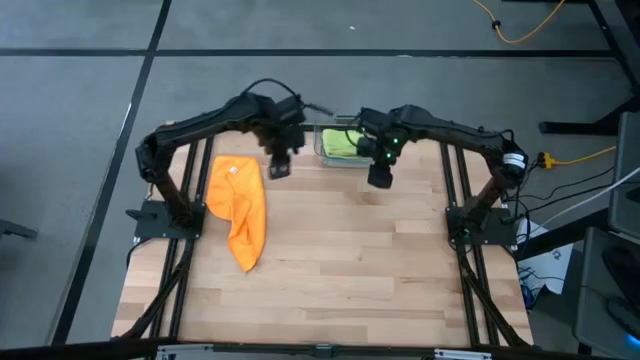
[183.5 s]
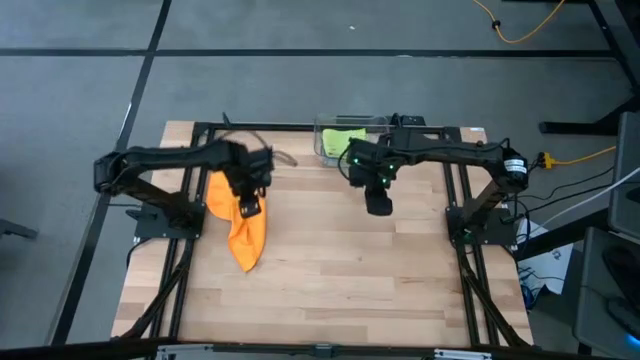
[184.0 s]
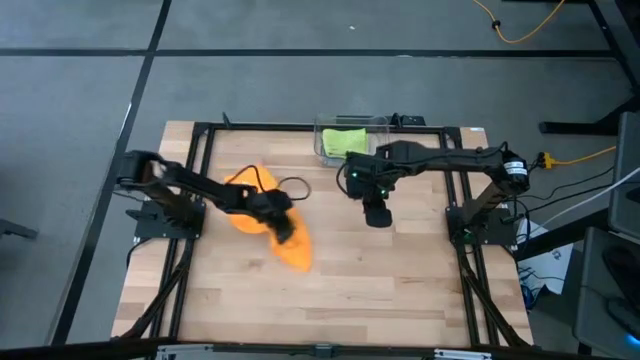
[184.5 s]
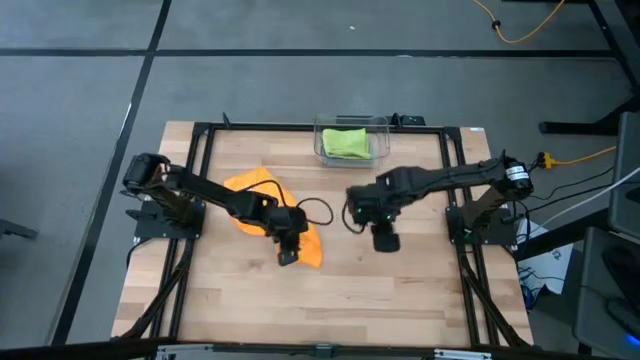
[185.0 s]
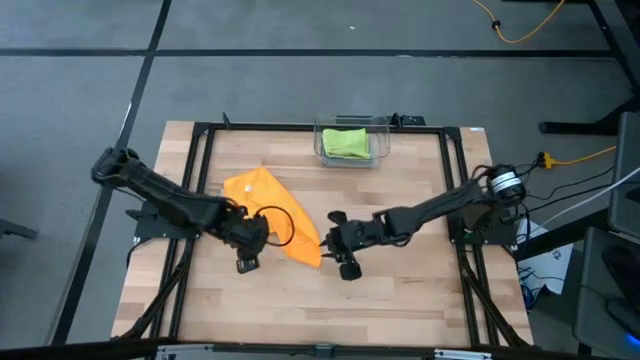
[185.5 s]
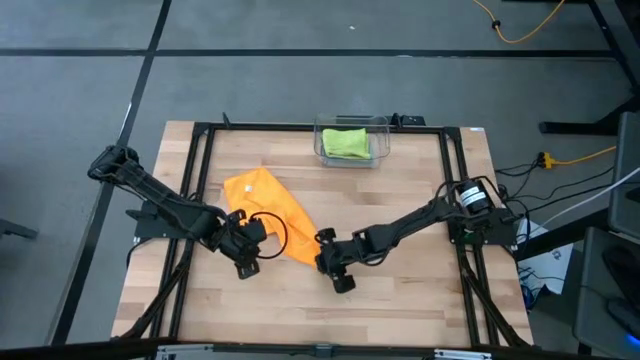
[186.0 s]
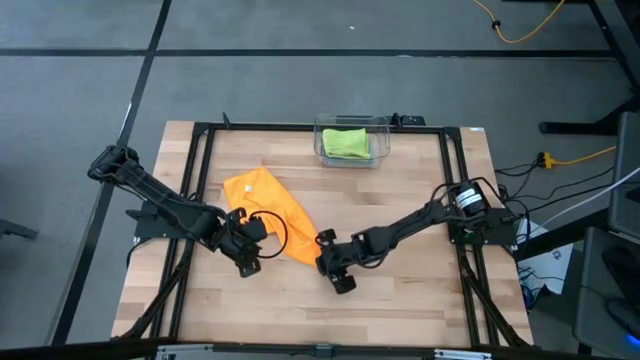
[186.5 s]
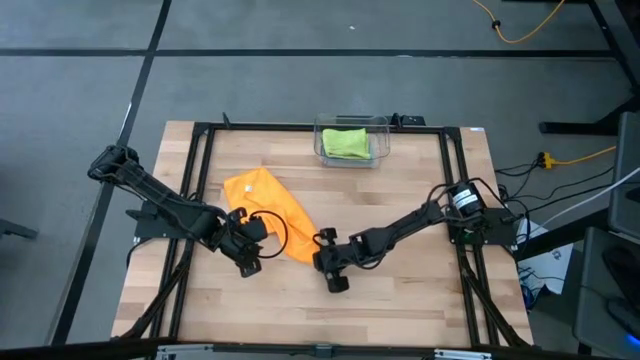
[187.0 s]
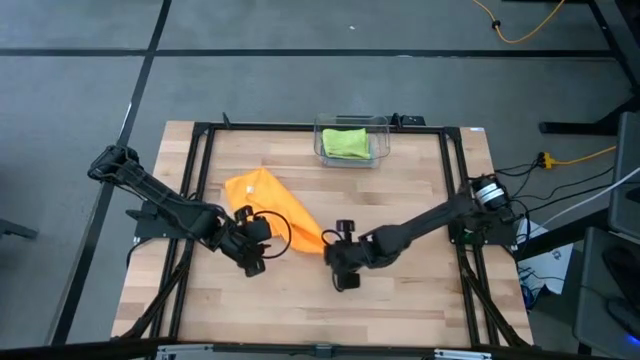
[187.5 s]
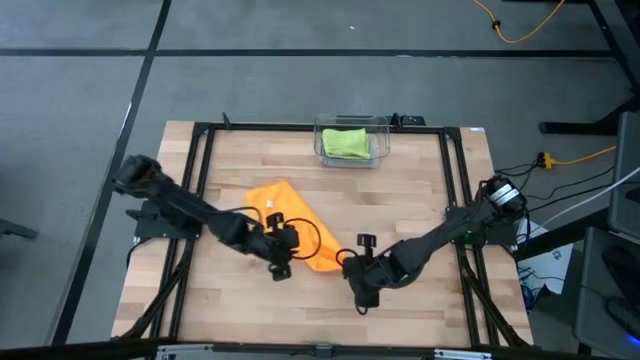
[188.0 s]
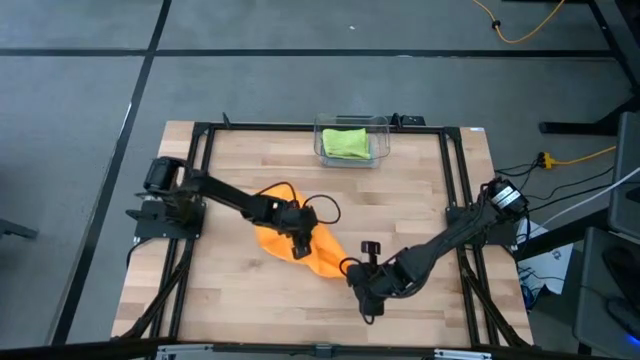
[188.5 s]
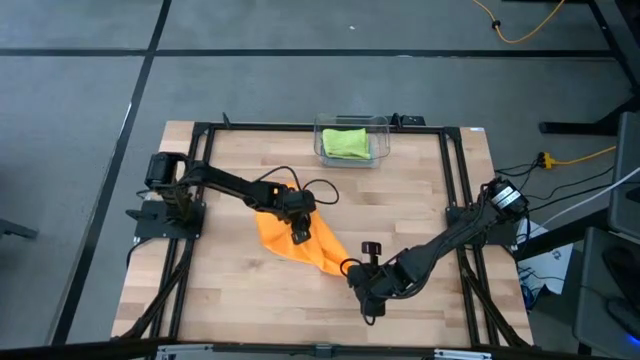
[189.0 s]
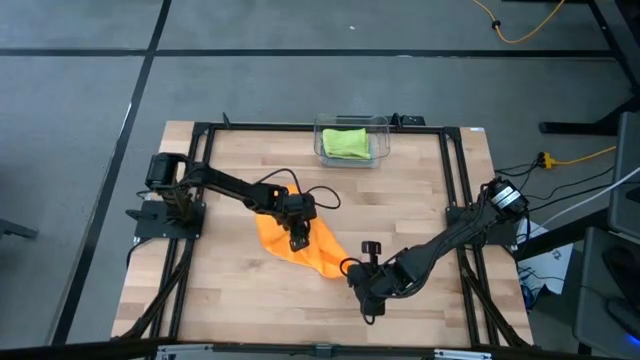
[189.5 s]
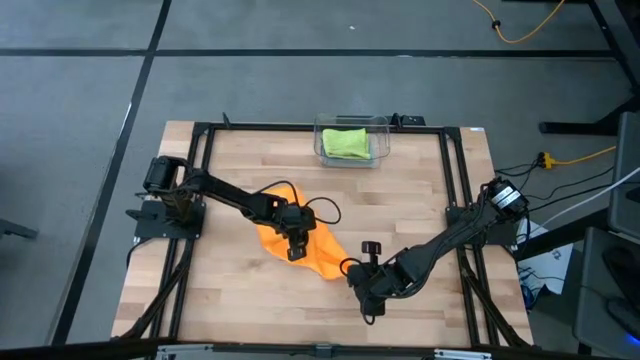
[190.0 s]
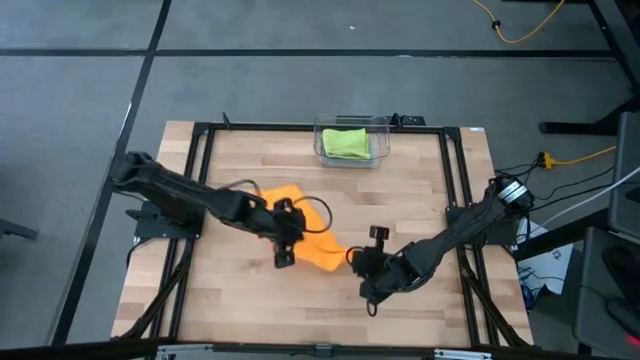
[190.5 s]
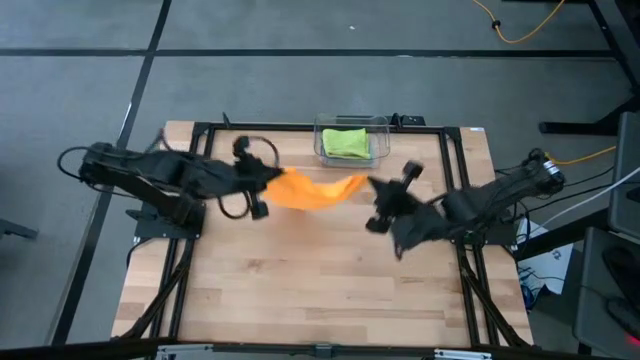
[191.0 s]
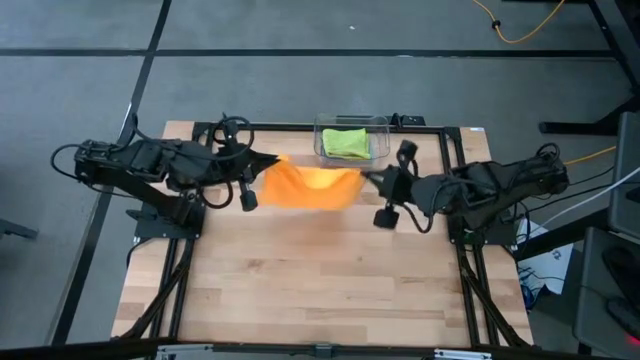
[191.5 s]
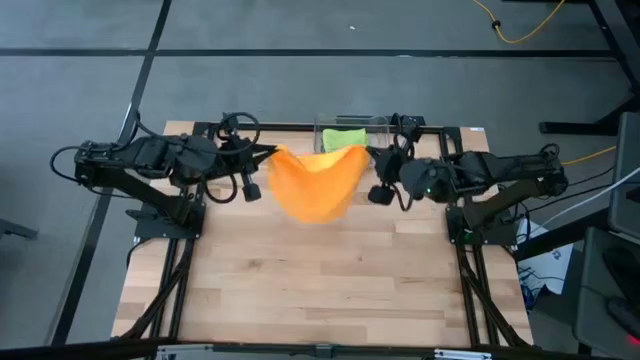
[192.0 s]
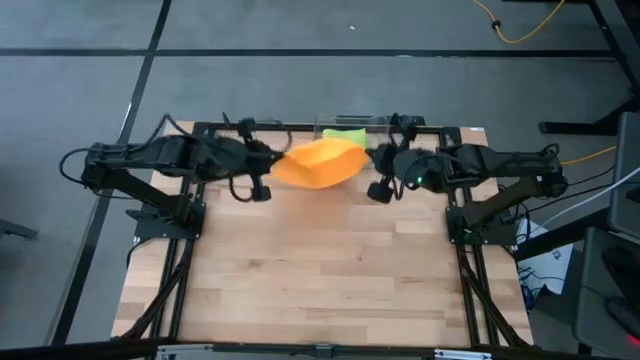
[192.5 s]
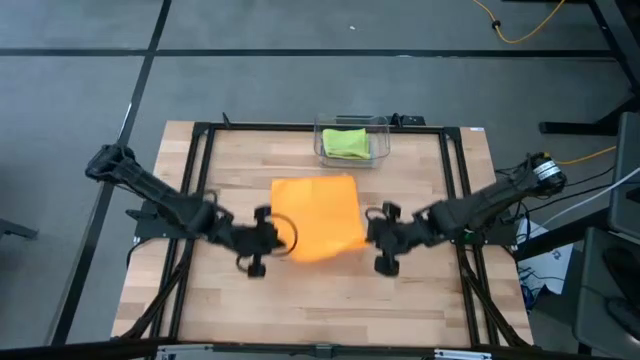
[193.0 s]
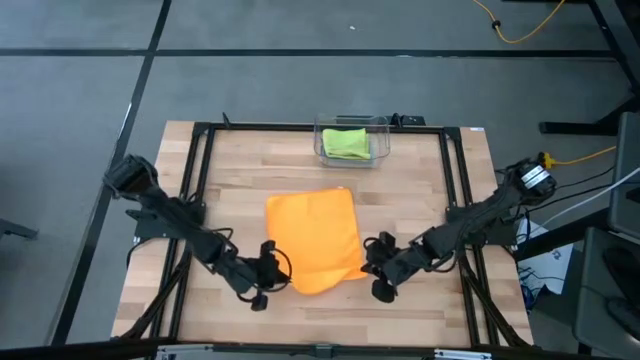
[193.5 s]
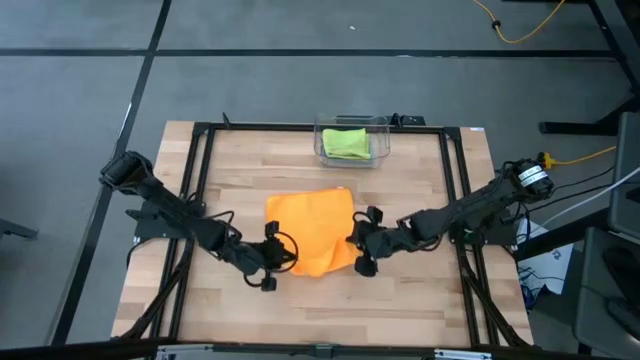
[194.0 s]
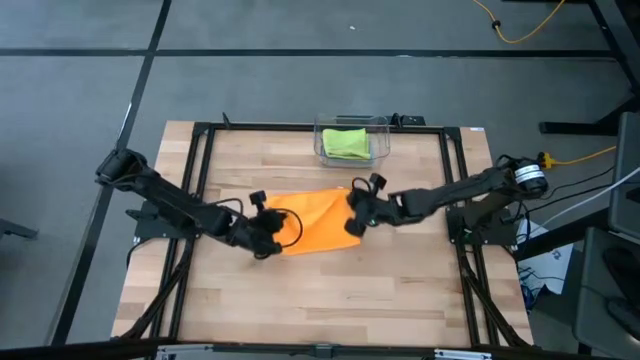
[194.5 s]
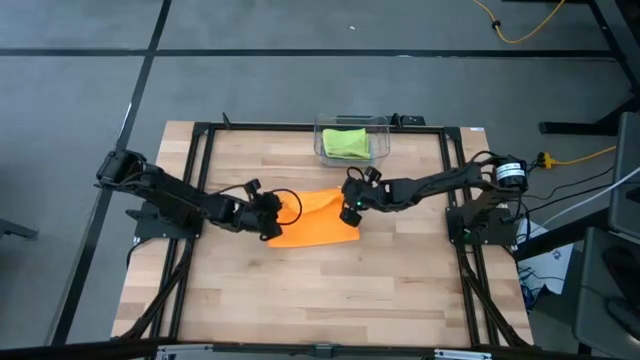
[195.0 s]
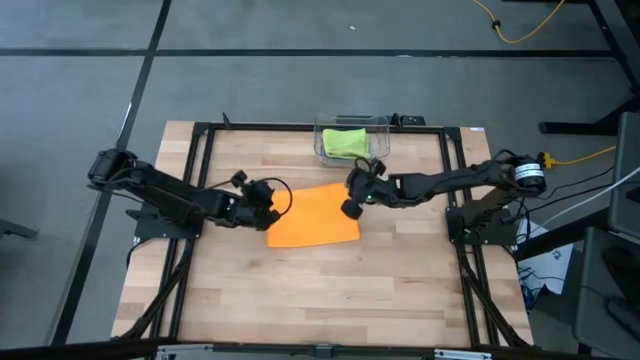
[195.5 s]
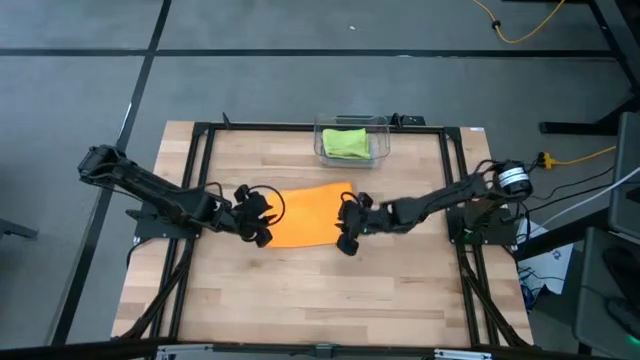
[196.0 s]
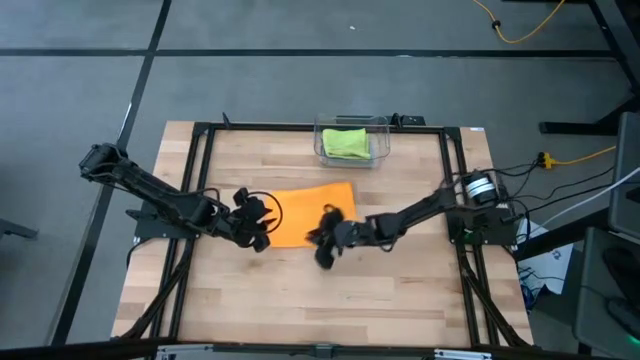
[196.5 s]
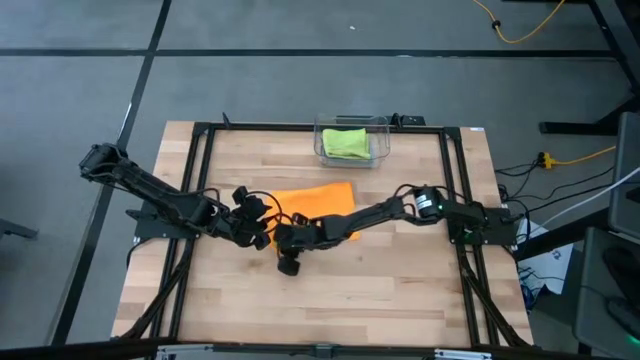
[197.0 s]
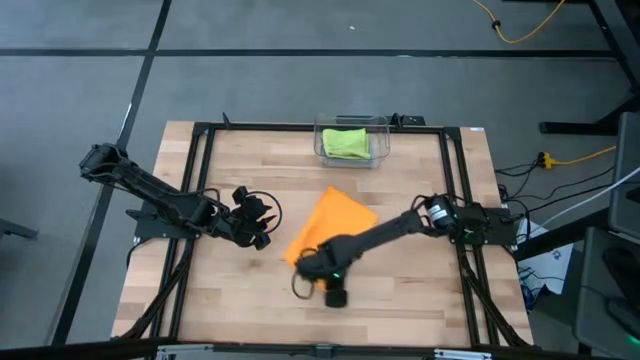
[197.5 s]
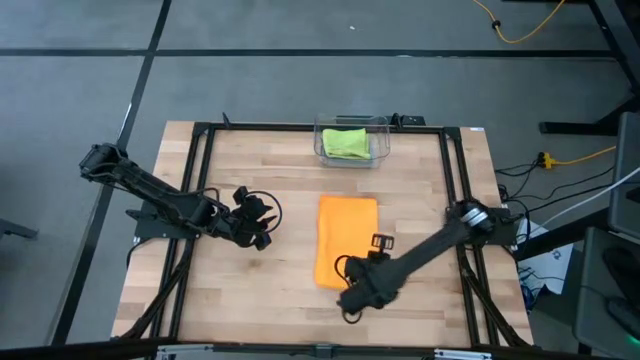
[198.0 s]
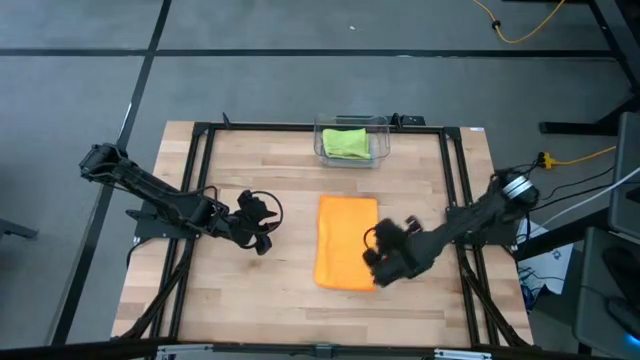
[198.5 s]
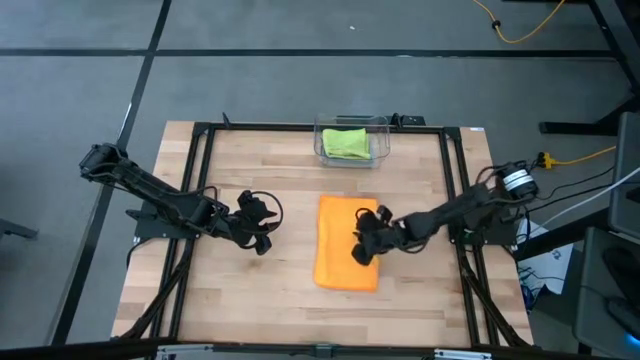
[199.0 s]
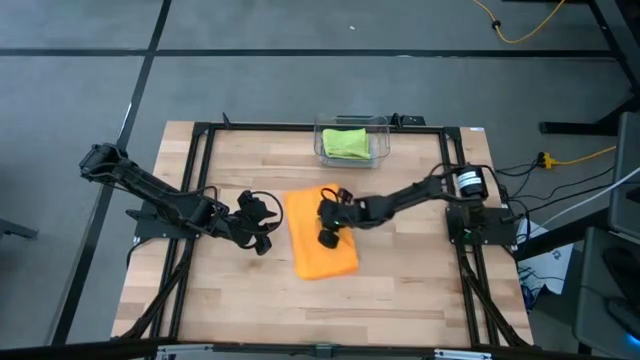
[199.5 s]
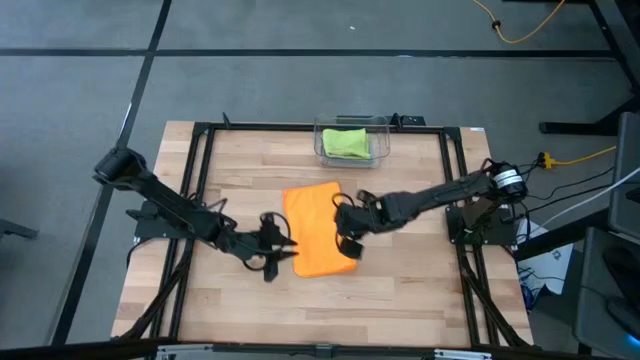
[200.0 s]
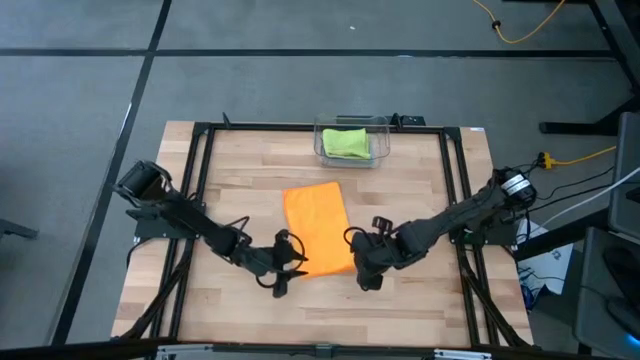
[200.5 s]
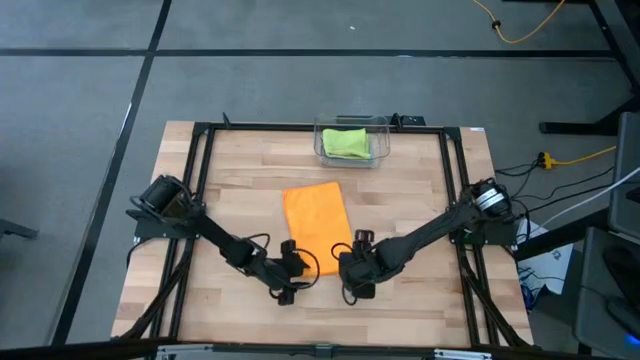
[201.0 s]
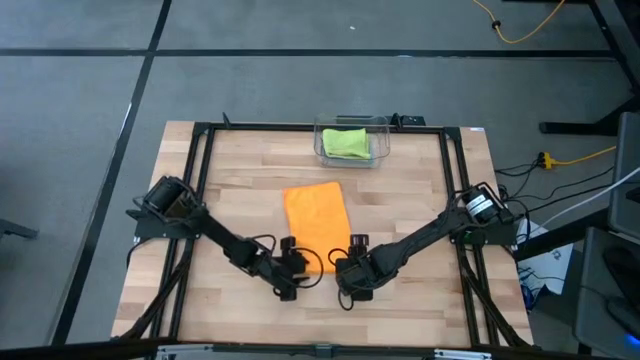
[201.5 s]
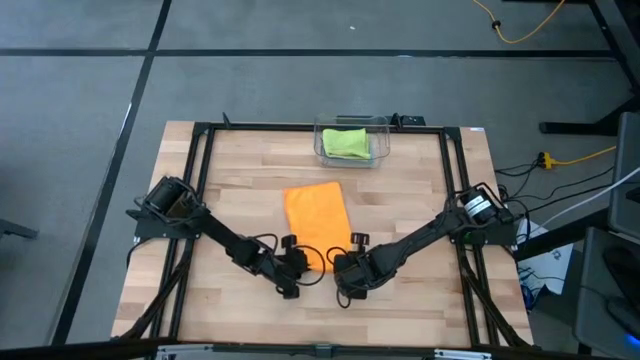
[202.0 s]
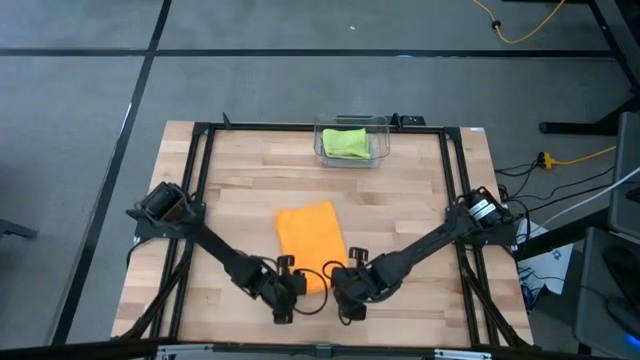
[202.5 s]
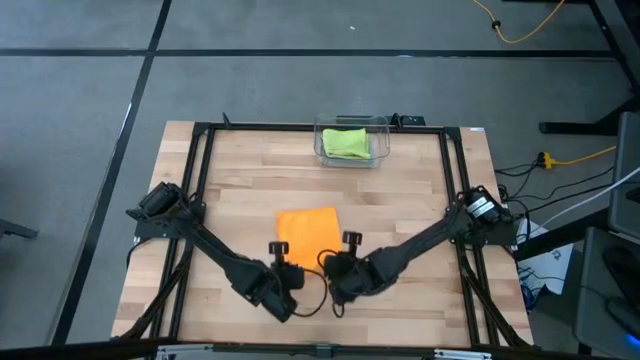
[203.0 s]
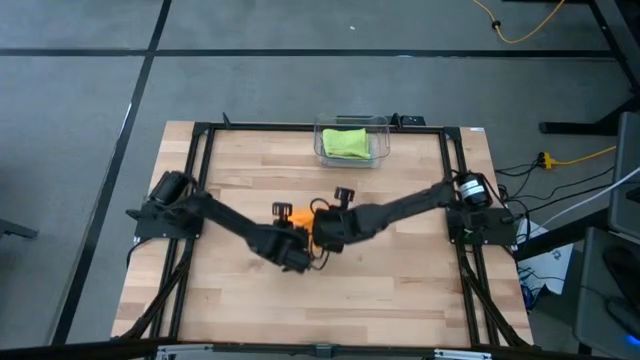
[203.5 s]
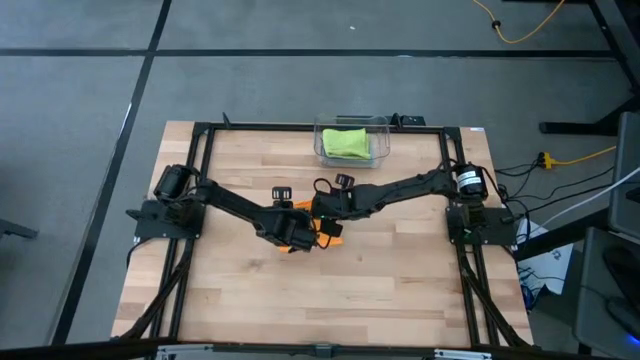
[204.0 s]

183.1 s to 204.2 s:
Task: Fold microfiber towels
Fold the orange microfiber towel

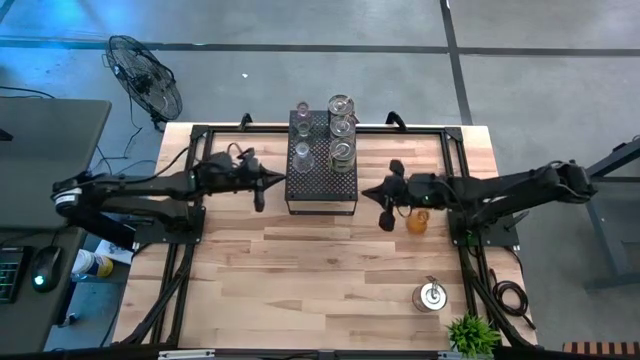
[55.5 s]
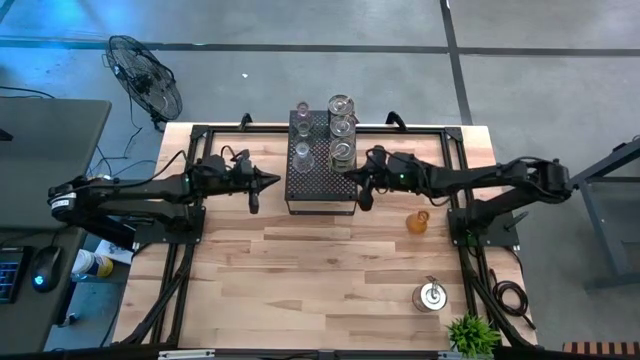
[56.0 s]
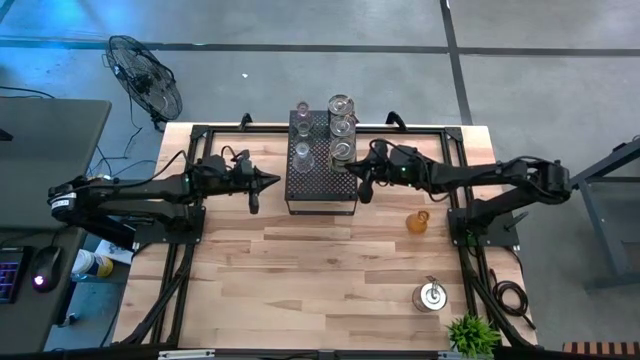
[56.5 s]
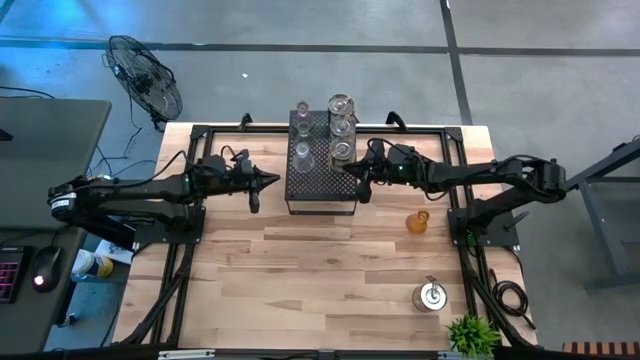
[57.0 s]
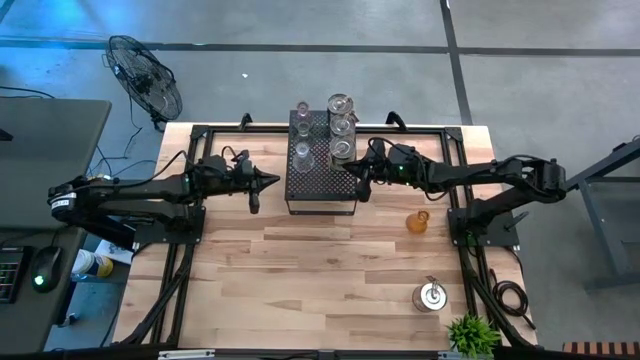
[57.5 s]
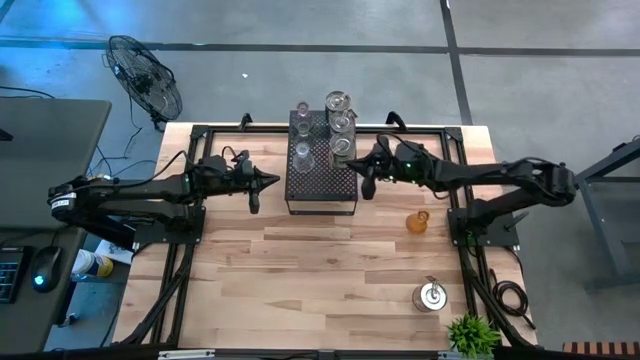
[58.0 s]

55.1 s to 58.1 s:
Task: Pick & Place candle stick holders
Adjust the green scented candle on the shelf
